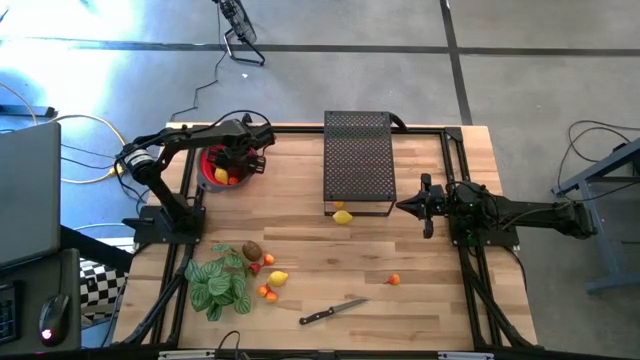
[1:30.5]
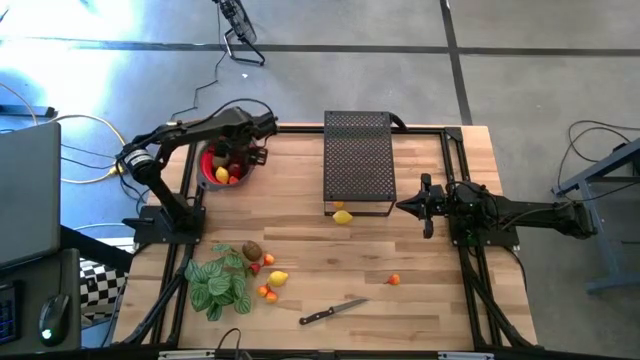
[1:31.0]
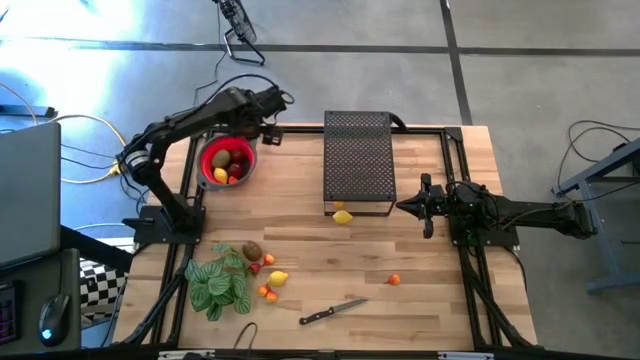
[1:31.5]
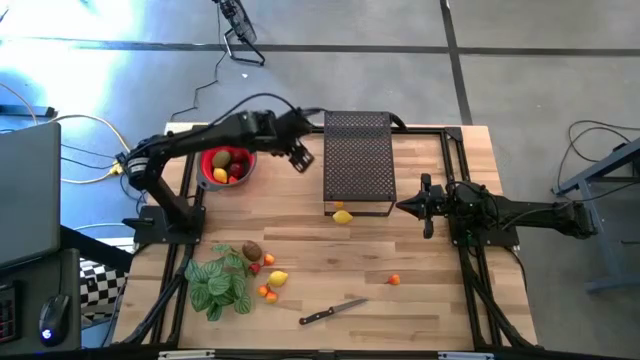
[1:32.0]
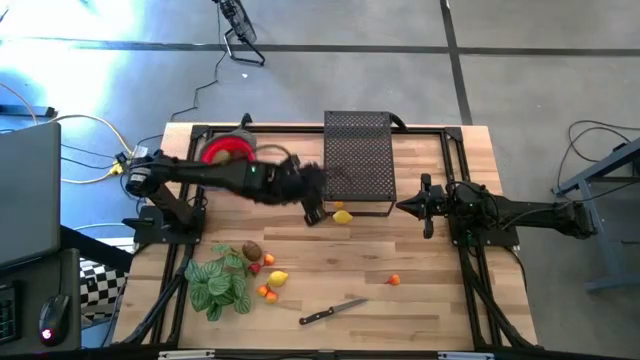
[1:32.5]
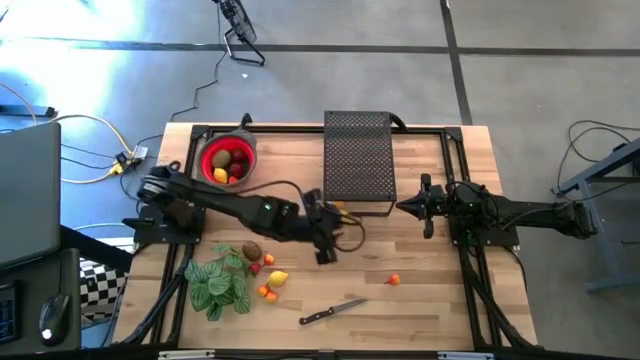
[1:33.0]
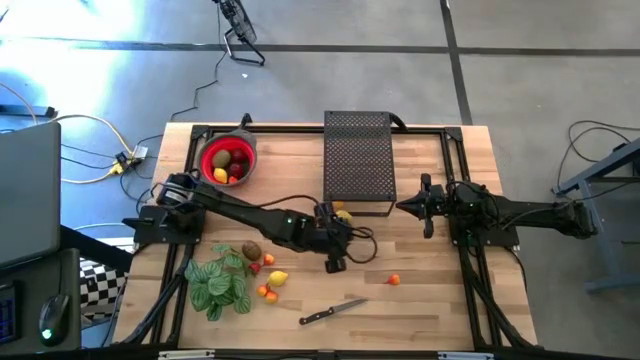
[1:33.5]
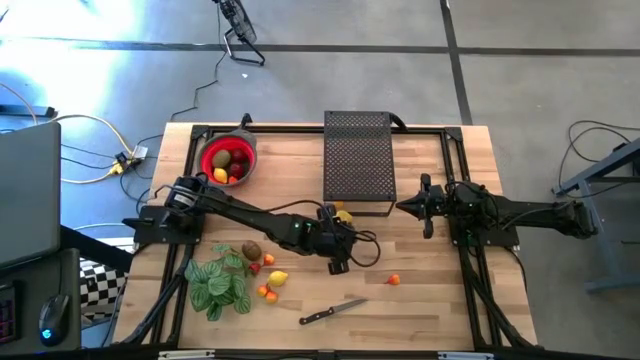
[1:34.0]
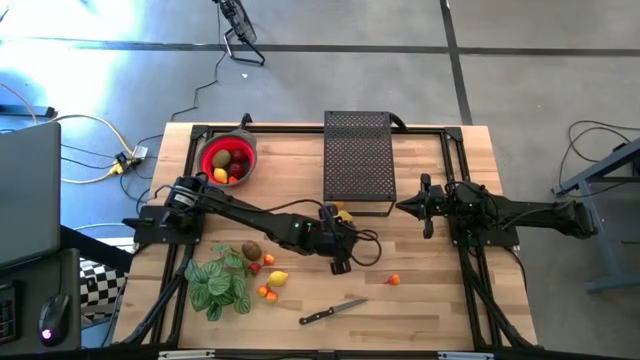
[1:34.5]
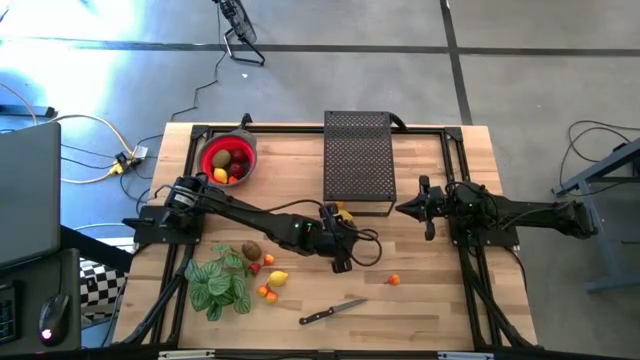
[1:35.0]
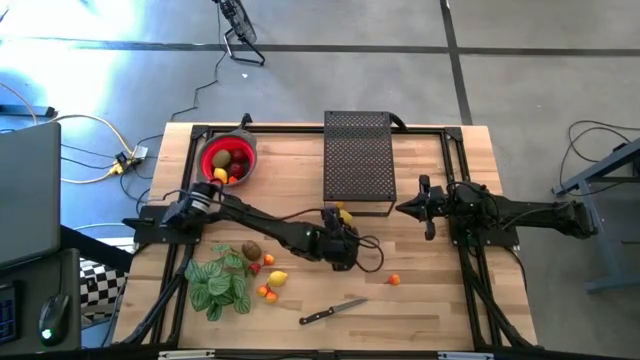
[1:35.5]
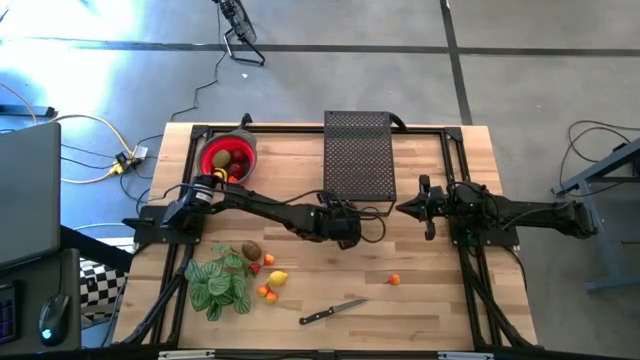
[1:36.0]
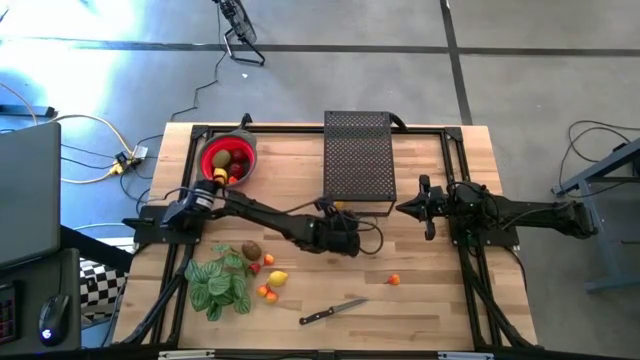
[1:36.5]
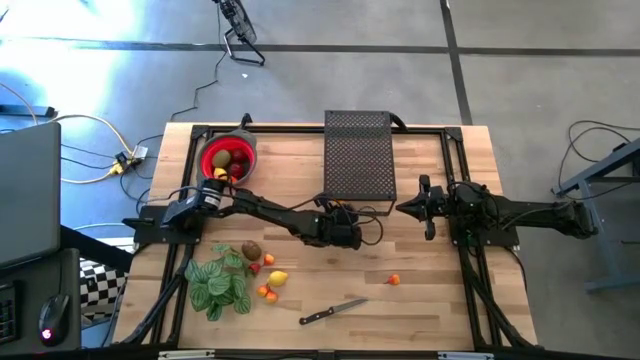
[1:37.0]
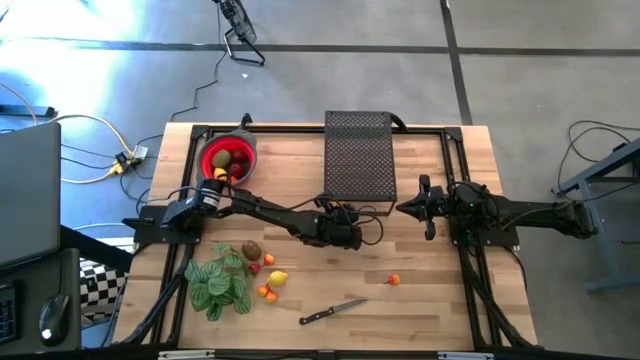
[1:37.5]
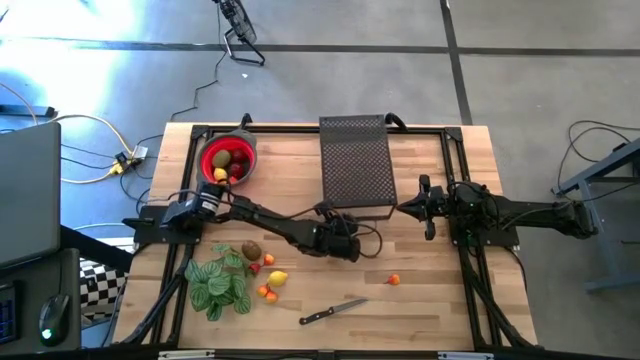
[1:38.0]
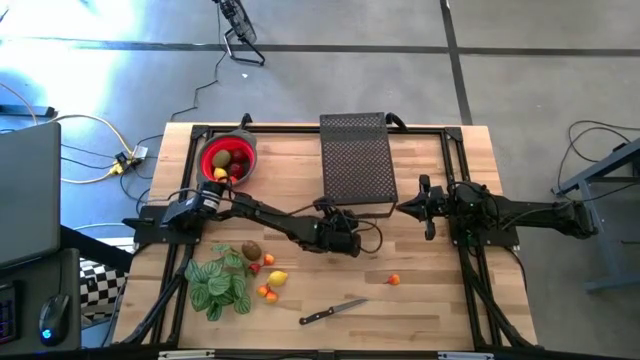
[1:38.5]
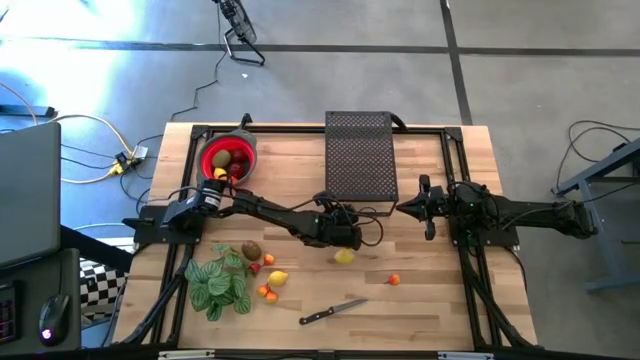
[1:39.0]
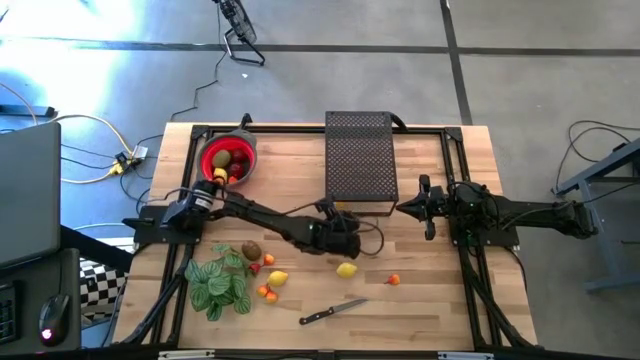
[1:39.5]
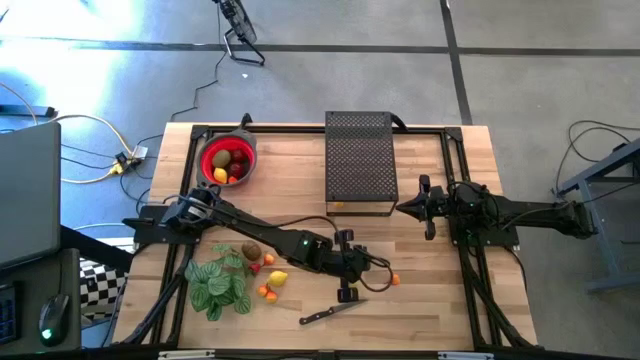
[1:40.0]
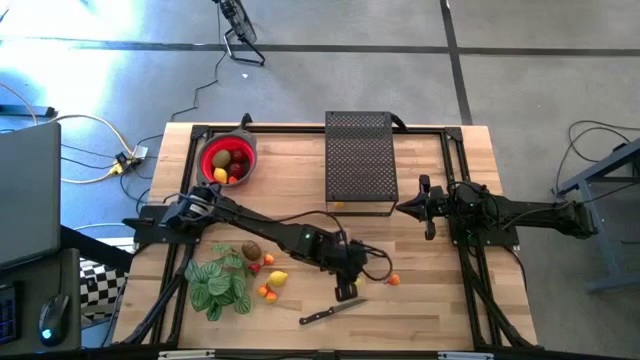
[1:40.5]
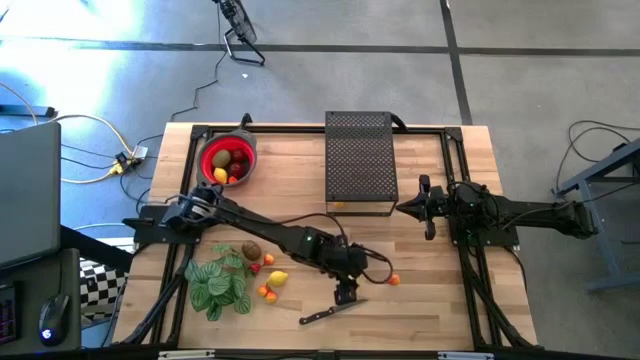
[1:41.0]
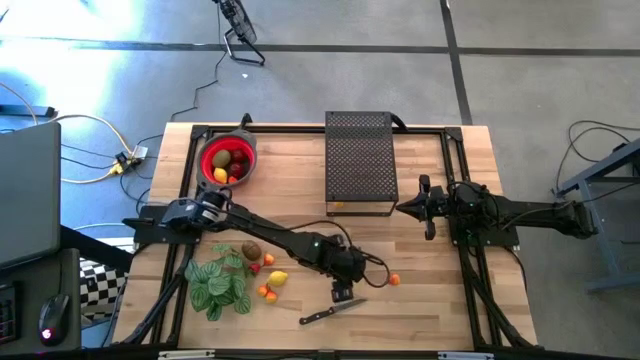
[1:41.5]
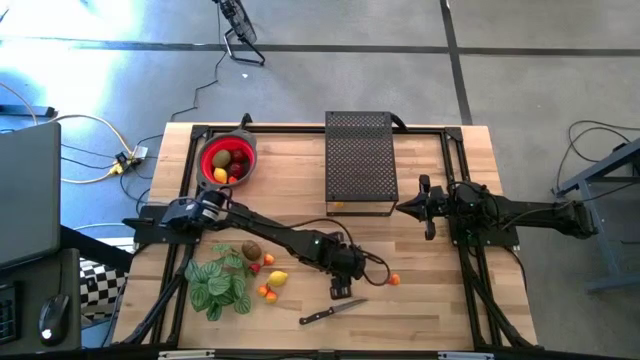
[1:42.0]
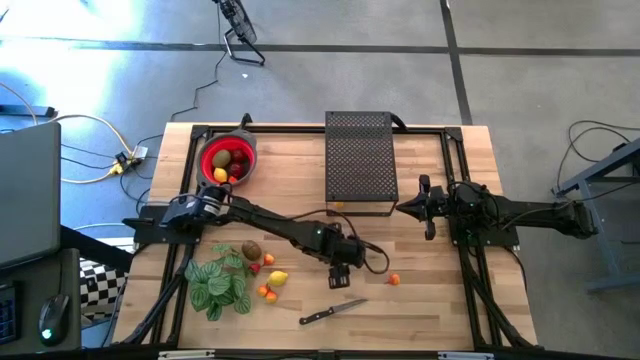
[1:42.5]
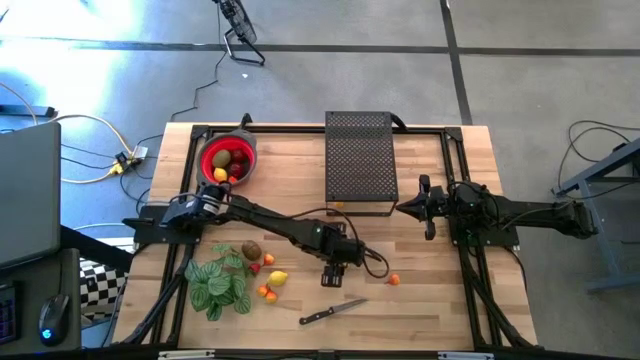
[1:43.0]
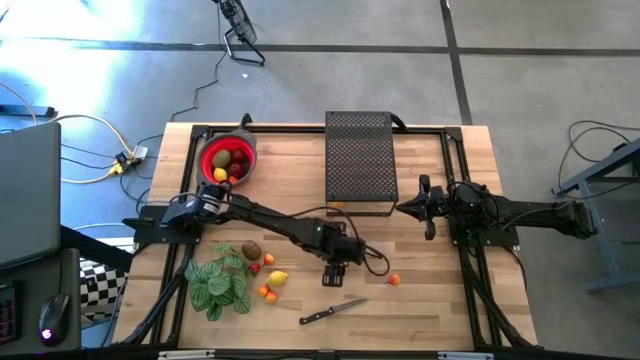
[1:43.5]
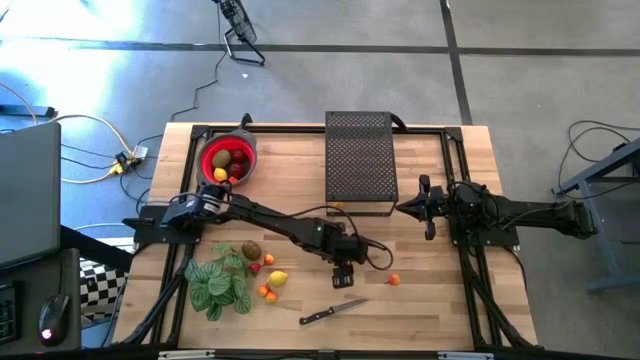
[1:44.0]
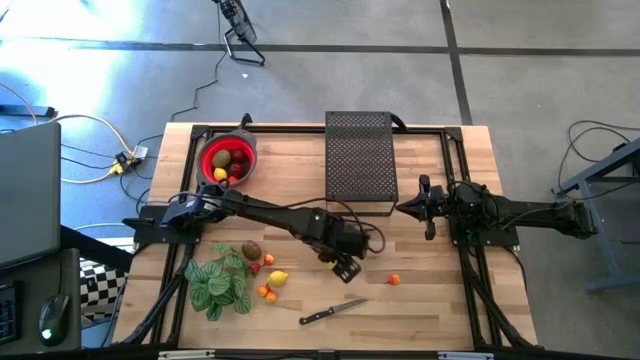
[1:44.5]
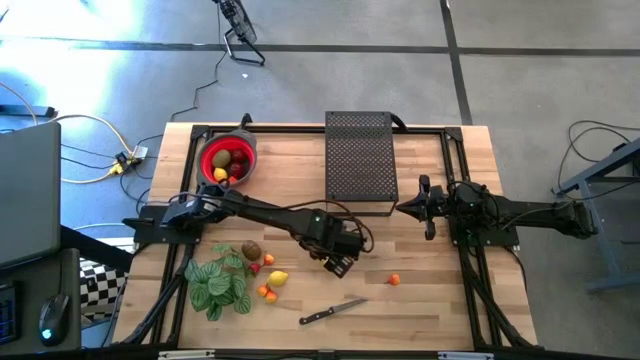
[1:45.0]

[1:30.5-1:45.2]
Task: Pick & Place Fruit
Put the top yellow lemon into the strainer bowl

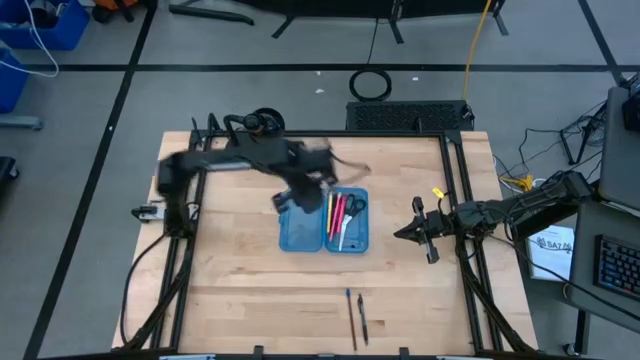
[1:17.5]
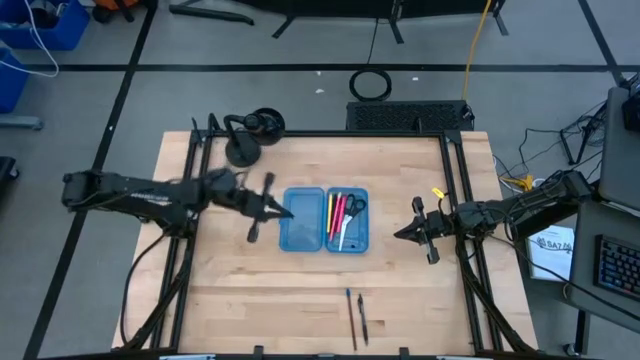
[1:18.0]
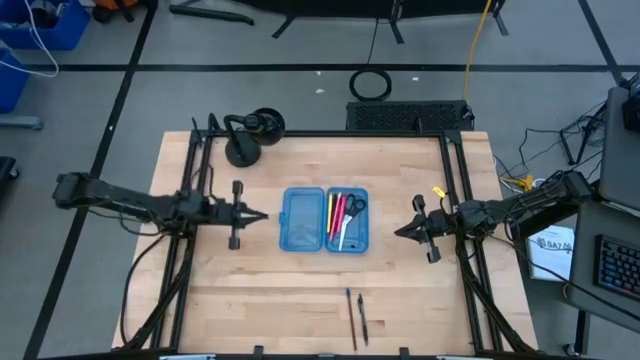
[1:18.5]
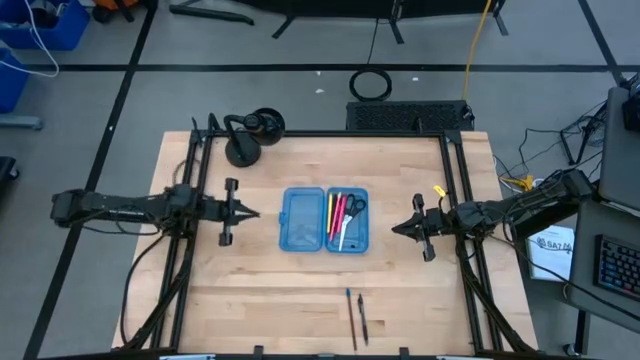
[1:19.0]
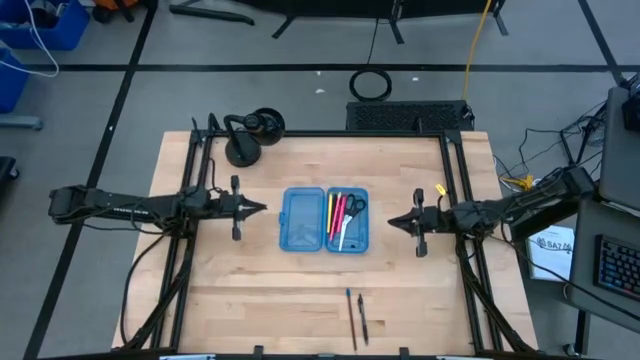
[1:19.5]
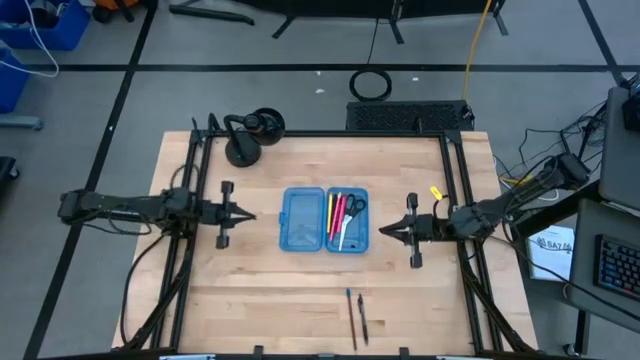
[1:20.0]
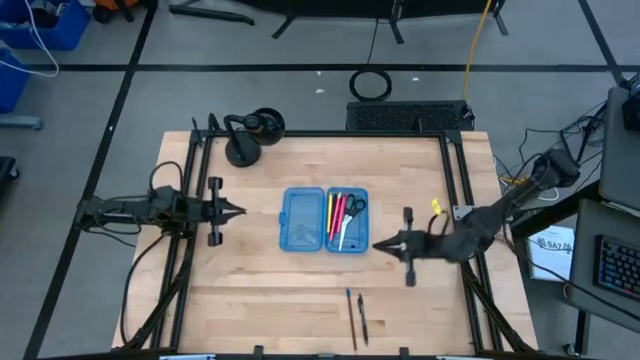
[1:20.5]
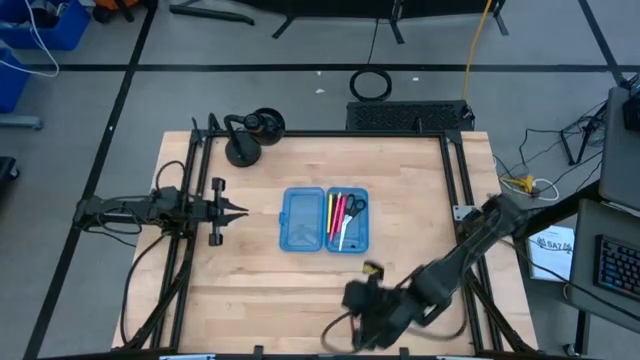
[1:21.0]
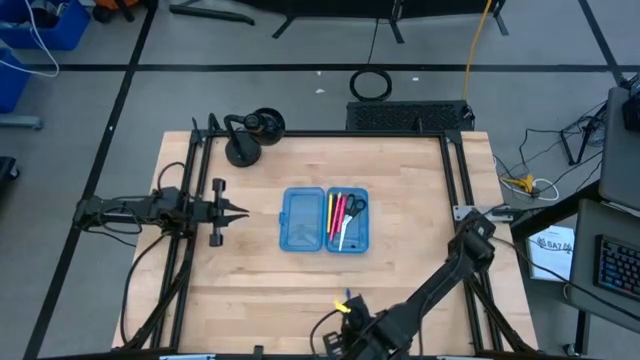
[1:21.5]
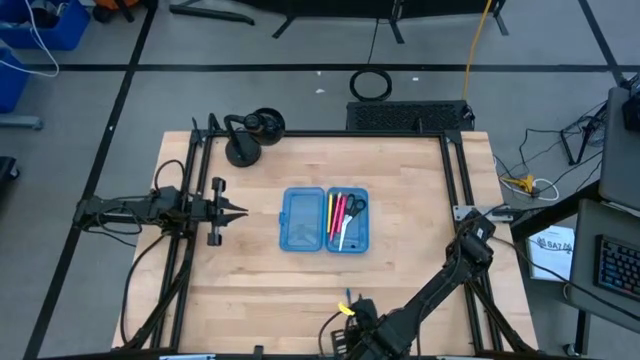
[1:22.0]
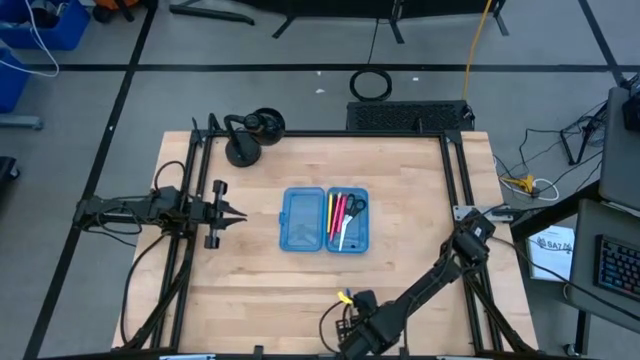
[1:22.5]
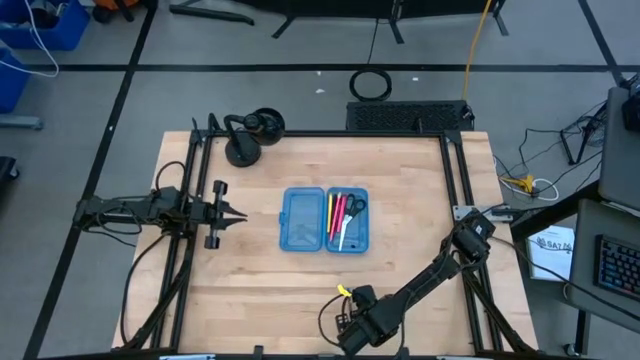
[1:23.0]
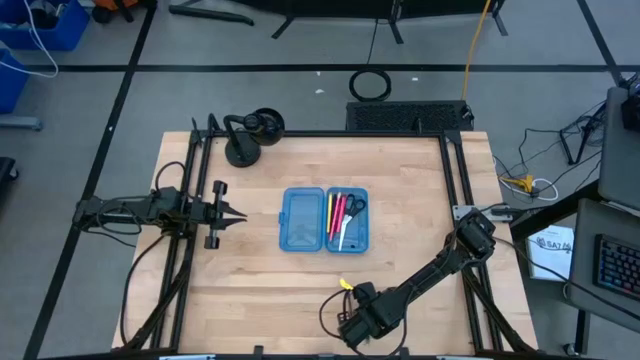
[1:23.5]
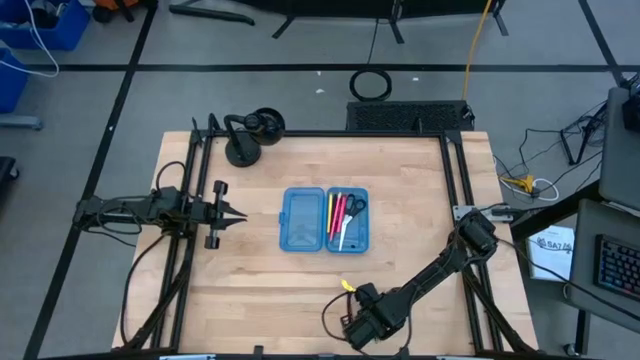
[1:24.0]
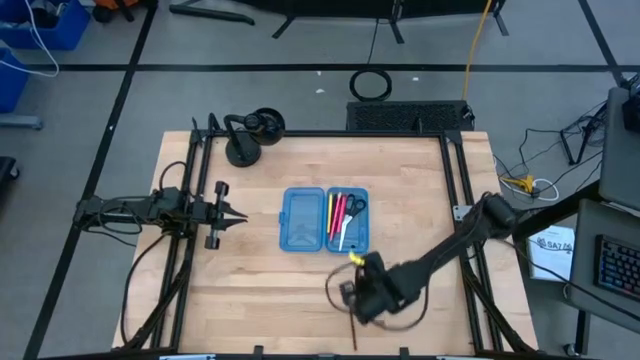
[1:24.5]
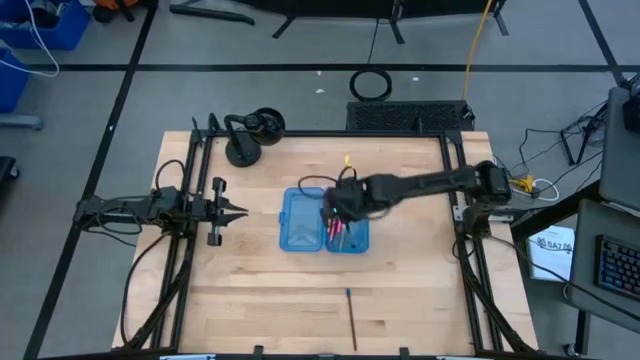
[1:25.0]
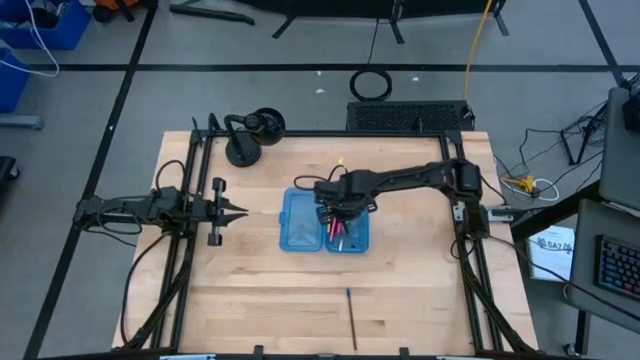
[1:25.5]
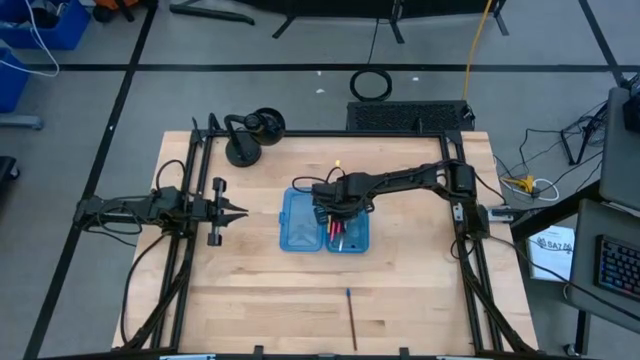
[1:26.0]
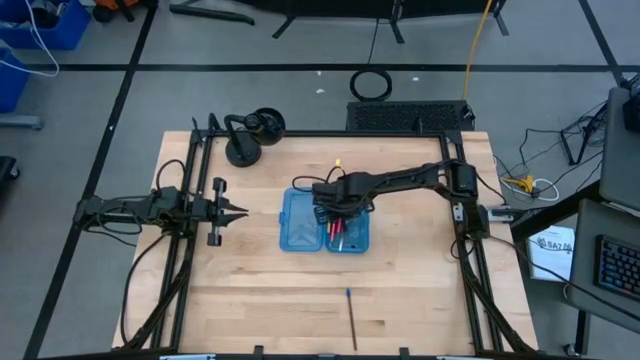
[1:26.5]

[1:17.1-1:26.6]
Task: Pick & place school supplies into a supply box
Put the black pen into the blue supply box
